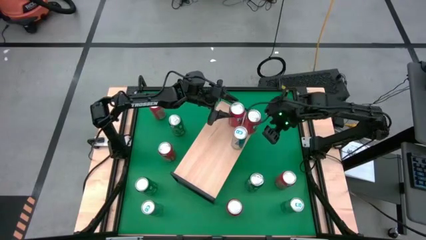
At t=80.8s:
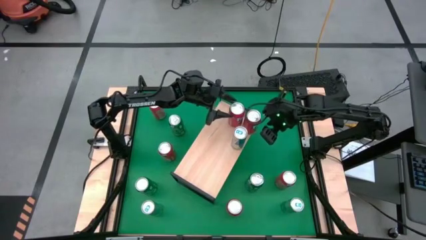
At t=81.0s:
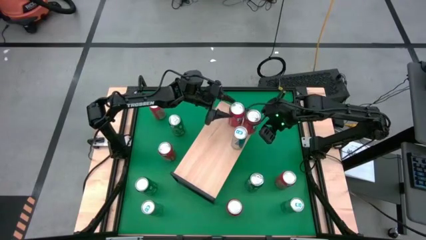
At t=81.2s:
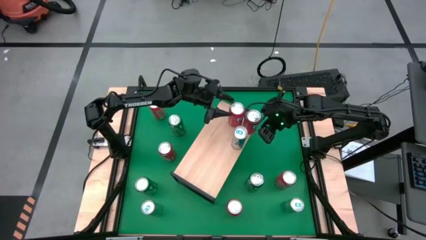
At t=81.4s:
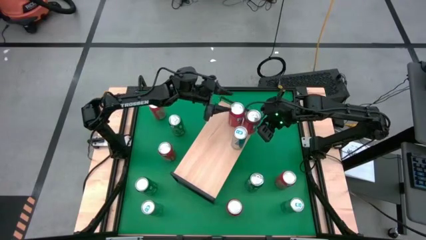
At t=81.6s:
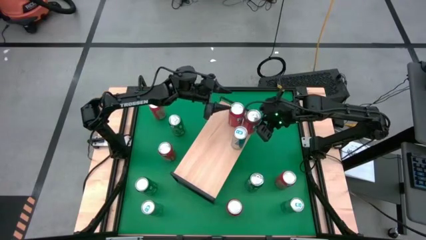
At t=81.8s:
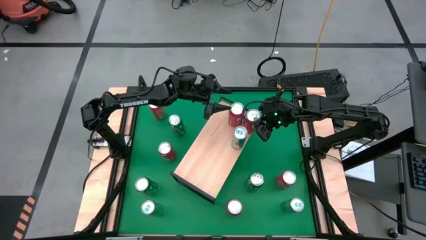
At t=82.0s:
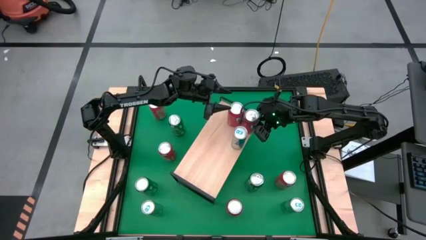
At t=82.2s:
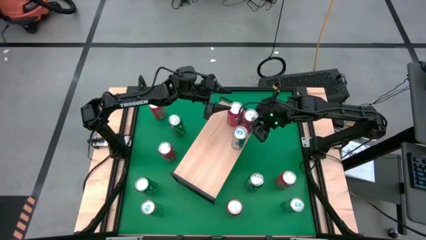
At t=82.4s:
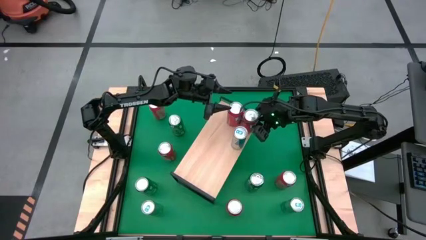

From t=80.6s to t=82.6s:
Task: Sort soda cans
Adjust the red soda cans on the shelf

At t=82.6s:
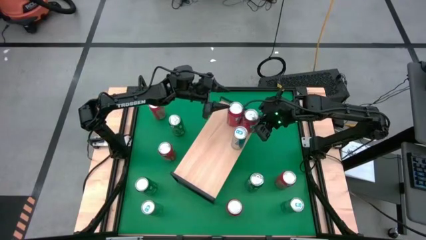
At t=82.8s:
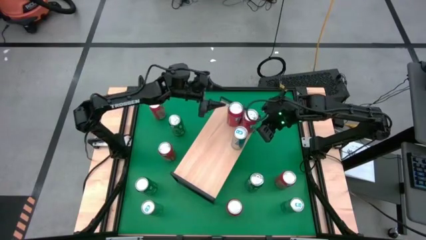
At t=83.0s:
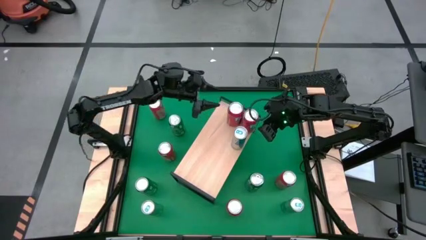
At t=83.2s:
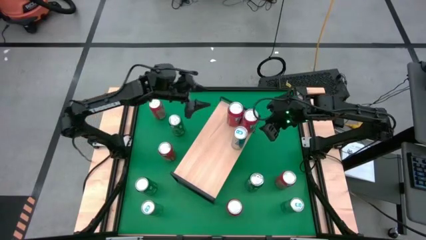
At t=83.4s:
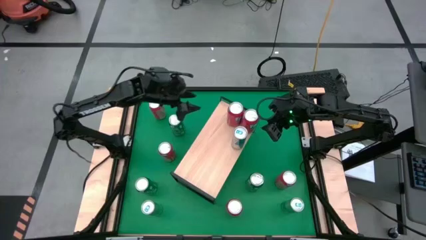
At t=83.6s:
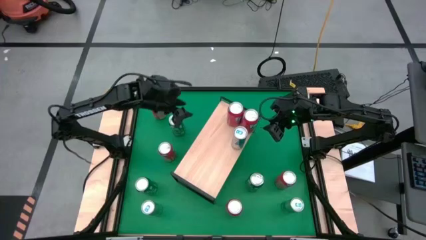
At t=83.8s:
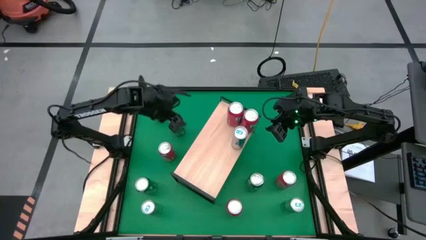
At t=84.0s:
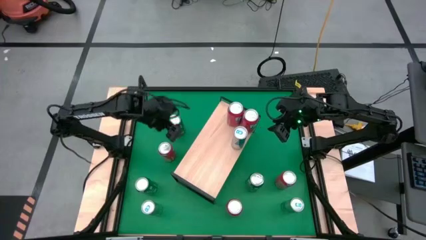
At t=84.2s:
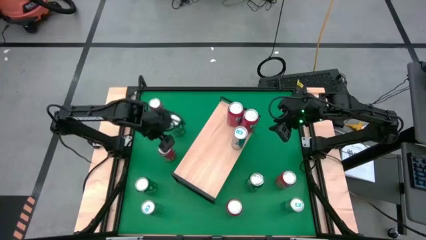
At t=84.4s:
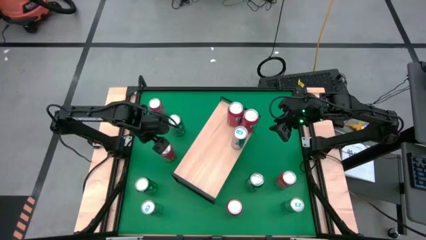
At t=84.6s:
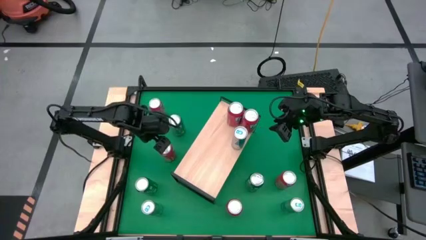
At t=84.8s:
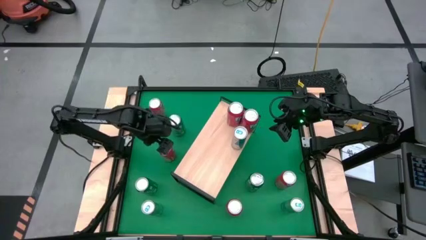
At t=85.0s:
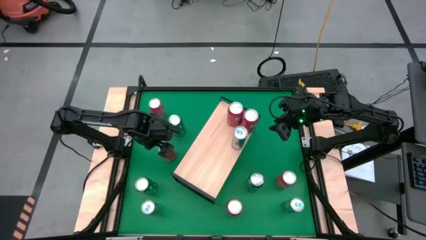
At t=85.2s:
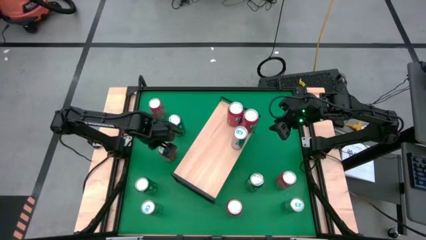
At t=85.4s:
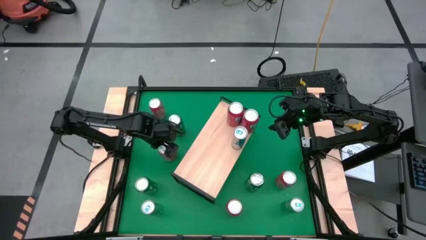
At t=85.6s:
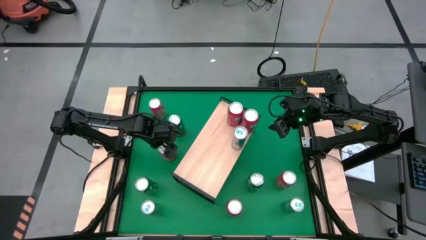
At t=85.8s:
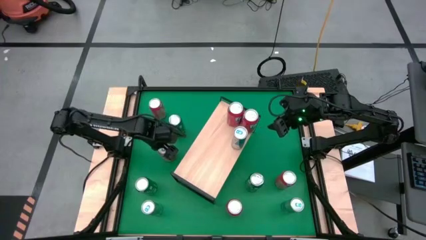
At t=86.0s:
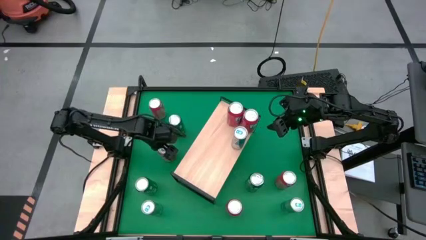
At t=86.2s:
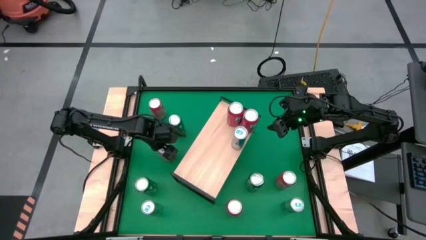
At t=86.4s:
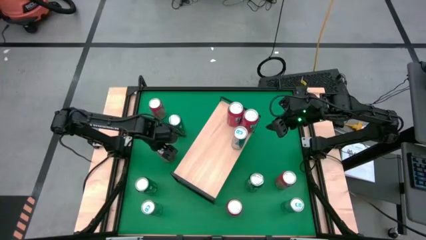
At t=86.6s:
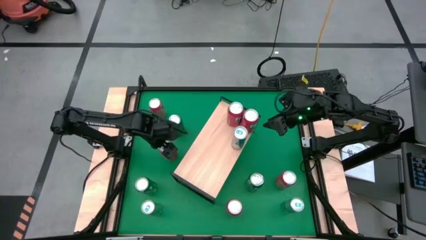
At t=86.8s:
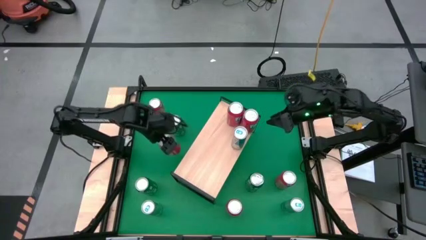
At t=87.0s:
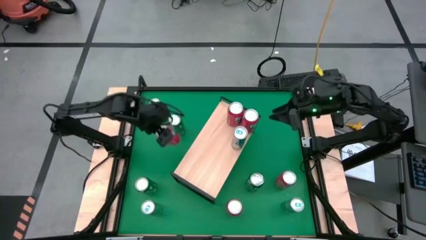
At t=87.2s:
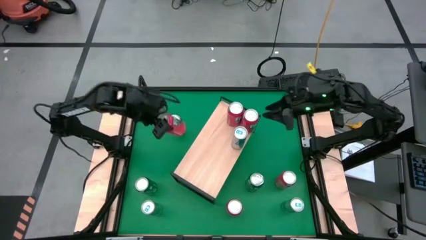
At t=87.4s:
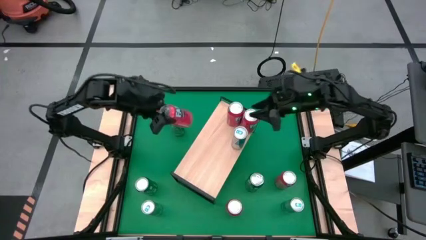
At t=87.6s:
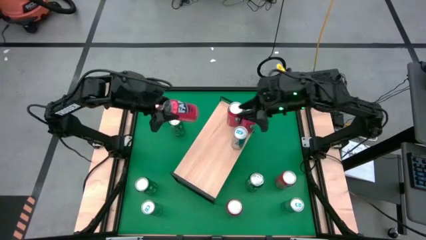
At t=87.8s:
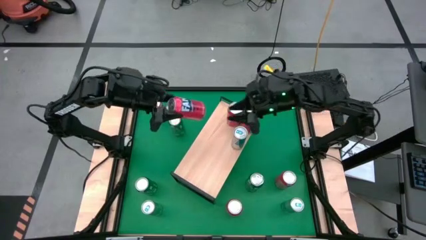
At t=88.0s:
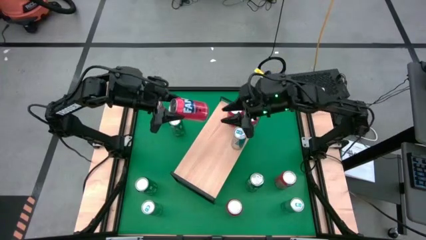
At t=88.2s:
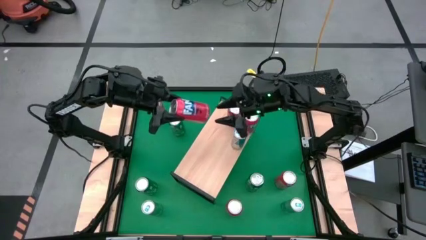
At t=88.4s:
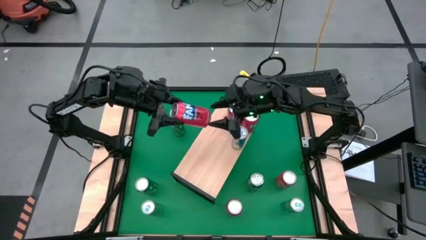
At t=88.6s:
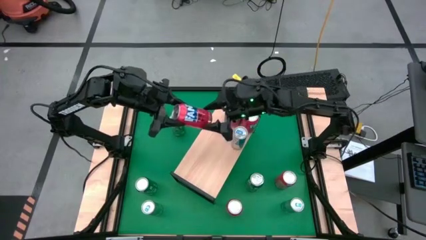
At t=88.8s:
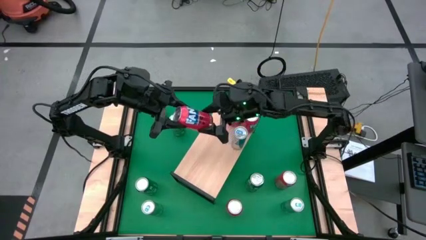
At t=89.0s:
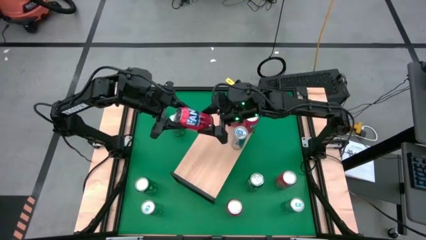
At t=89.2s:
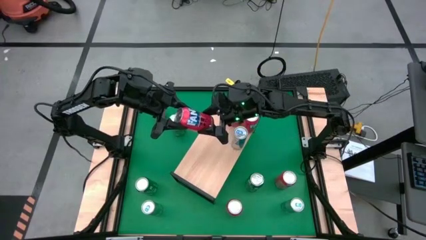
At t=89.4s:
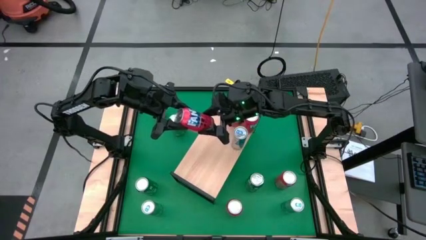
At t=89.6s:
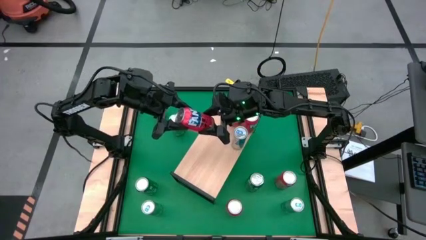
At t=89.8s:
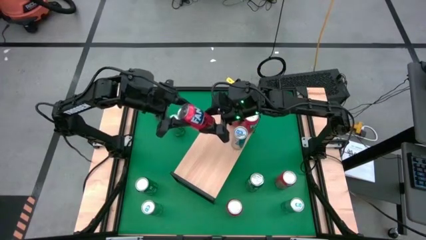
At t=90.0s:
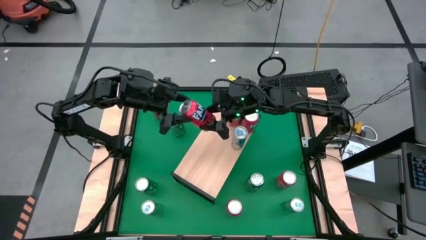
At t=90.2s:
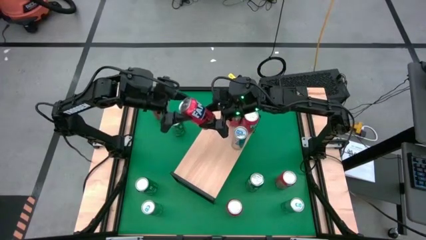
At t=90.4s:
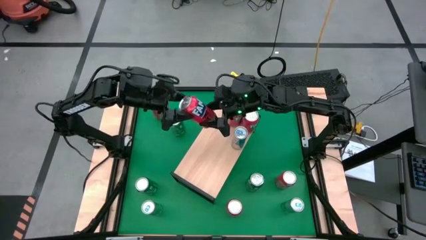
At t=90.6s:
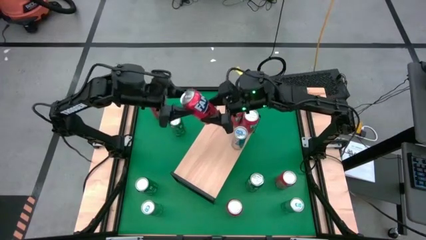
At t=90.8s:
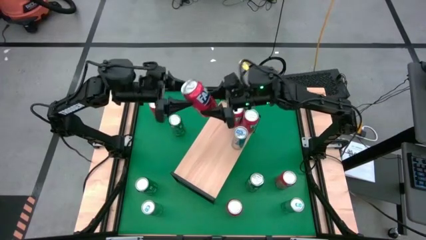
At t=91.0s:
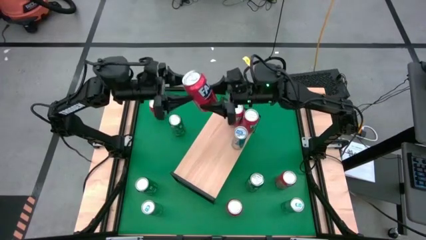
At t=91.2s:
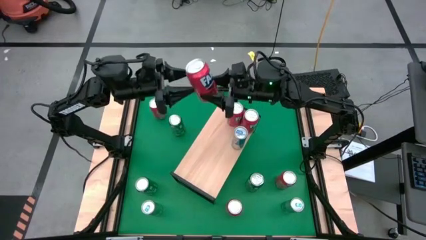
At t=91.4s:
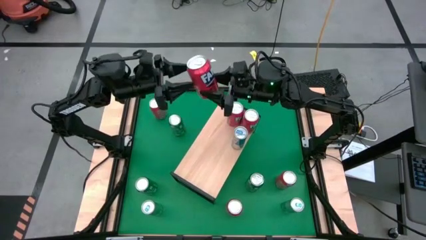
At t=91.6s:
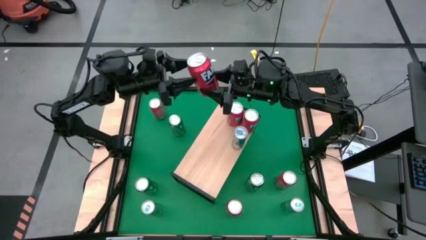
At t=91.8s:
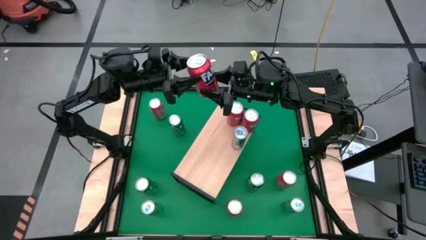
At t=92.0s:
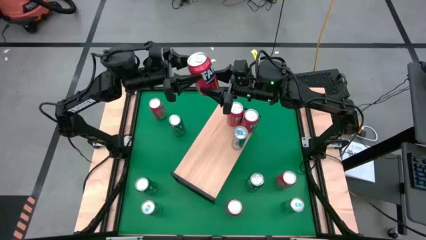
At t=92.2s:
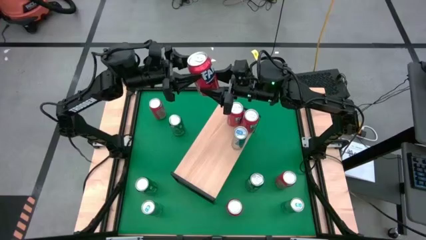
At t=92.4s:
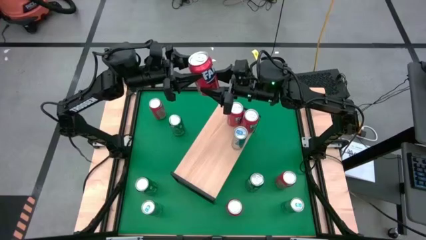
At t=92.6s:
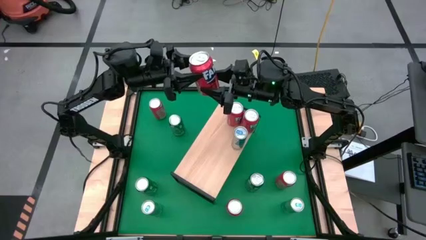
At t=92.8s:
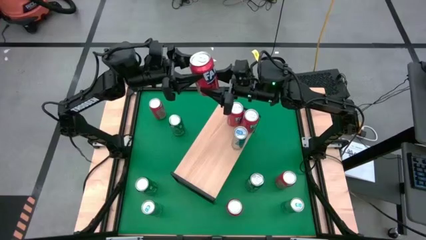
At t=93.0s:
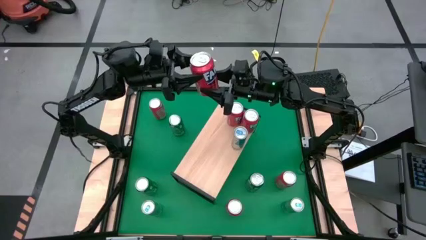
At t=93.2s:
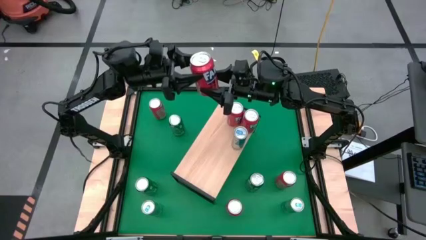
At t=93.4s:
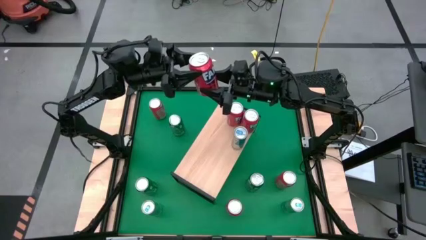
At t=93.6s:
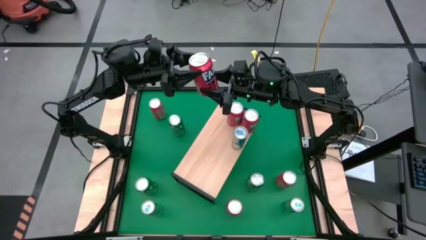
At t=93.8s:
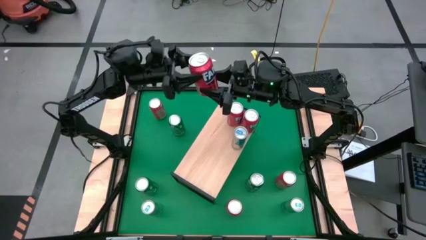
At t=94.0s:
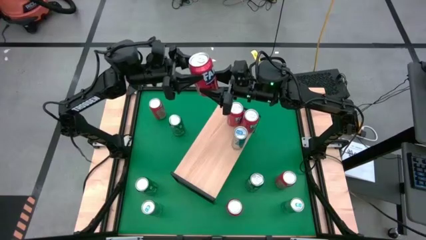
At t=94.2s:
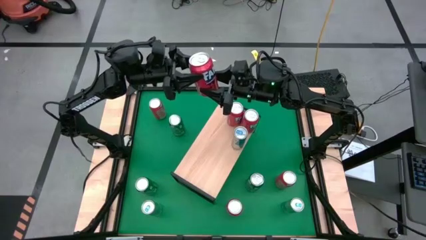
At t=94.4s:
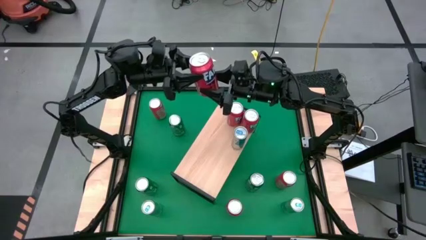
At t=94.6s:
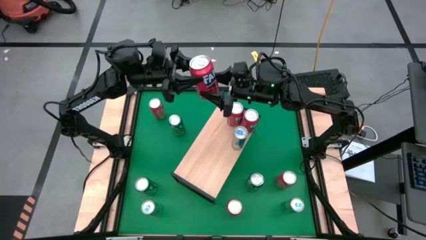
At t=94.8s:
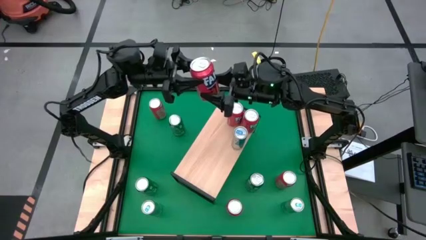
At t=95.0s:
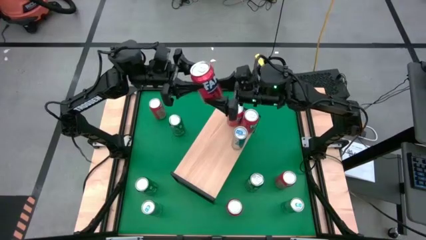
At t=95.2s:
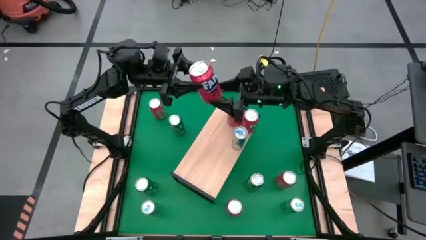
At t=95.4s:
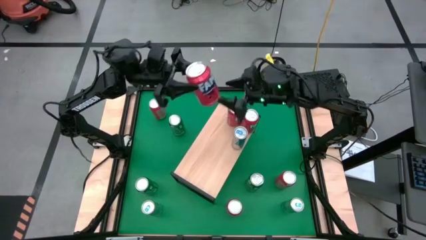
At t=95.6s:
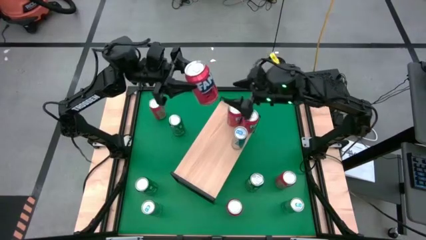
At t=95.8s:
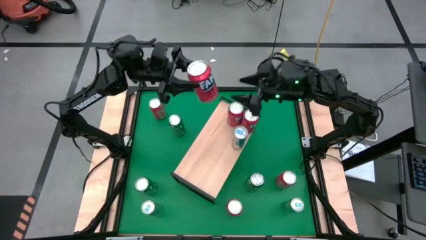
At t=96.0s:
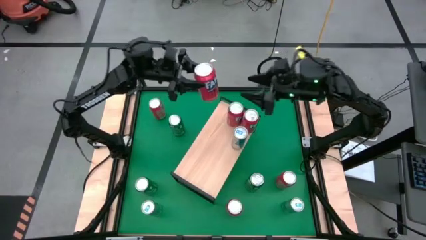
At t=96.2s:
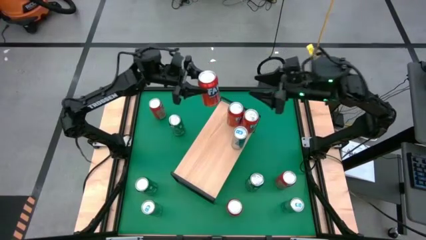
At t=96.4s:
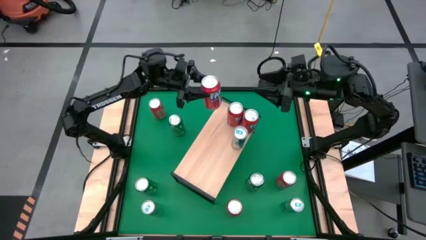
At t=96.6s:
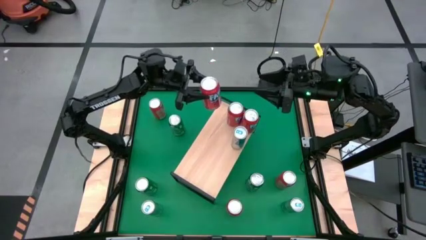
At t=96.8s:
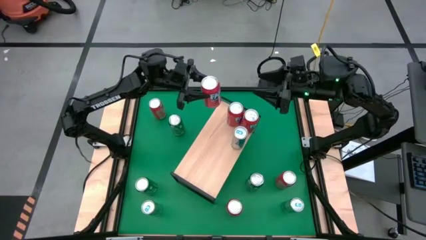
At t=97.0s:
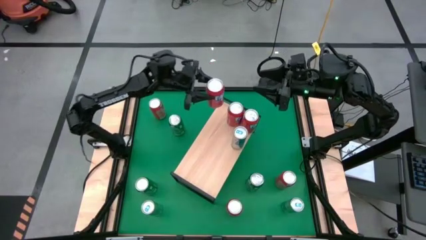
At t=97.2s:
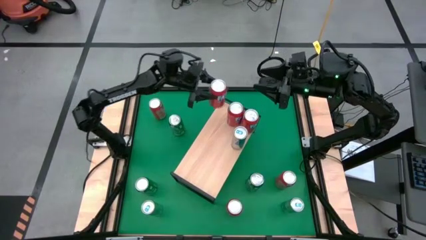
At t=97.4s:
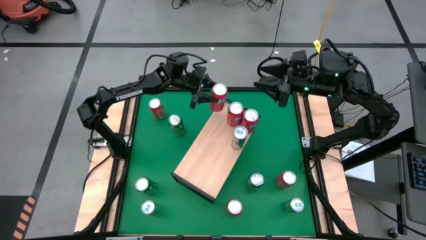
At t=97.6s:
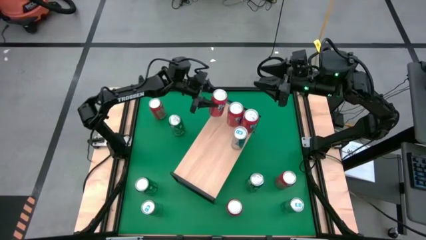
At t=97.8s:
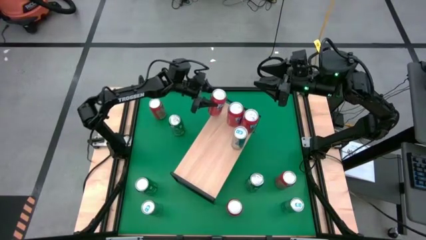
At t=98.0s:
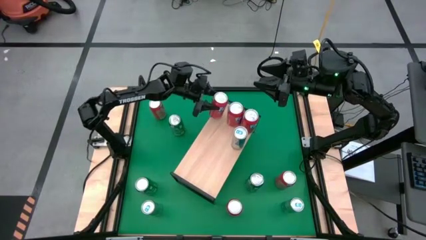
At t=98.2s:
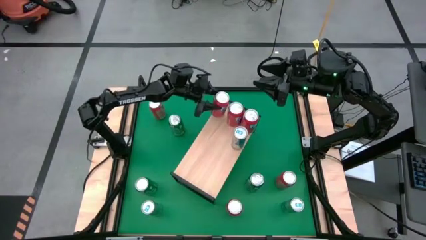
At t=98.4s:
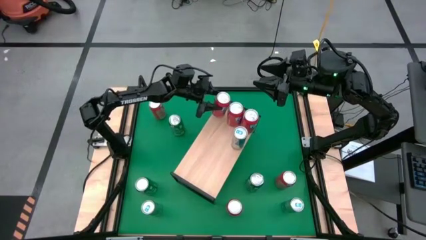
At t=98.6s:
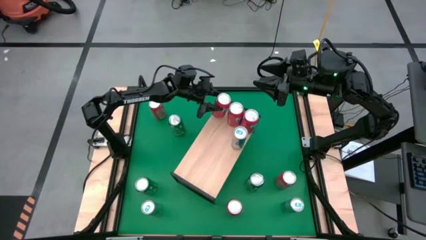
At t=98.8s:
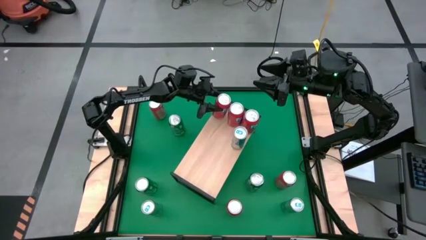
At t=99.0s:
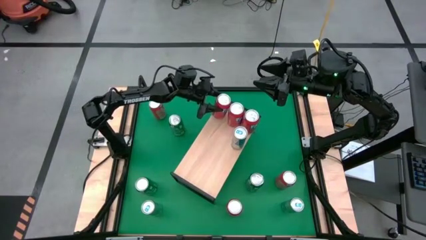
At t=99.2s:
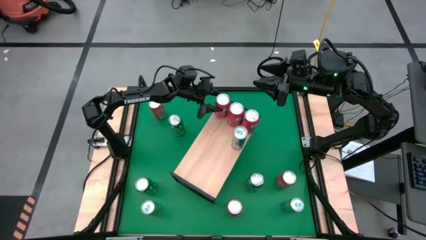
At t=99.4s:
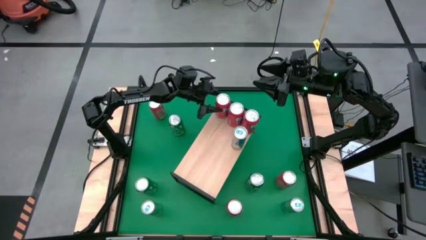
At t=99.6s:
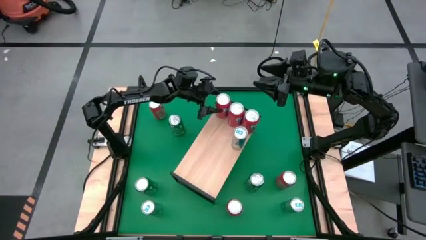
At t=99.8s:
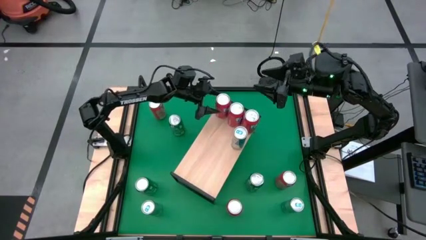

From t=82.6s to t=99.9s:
Put the red soda can on the shelf and align it with the other red soda cans
